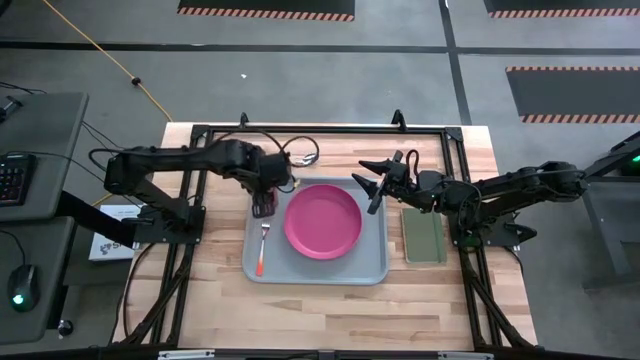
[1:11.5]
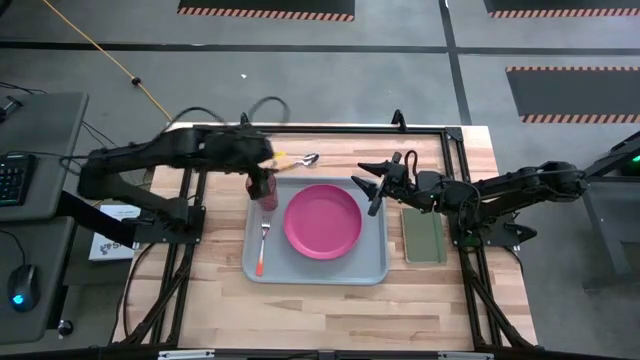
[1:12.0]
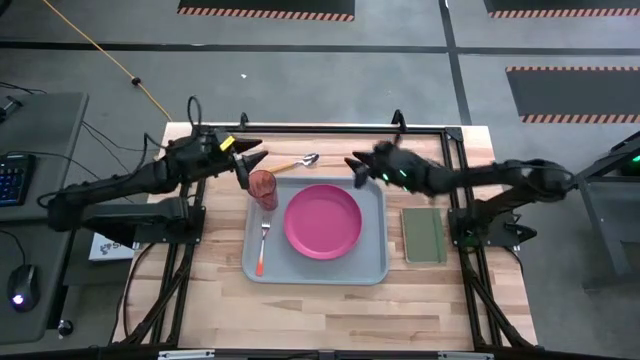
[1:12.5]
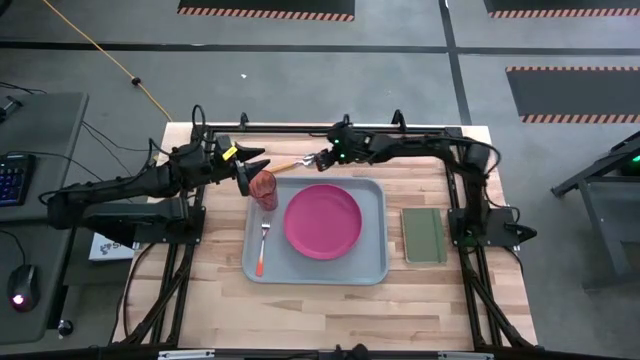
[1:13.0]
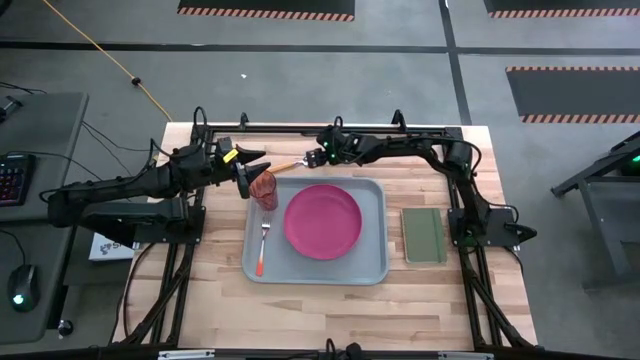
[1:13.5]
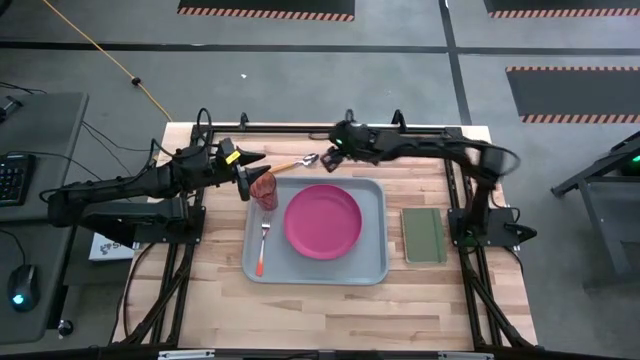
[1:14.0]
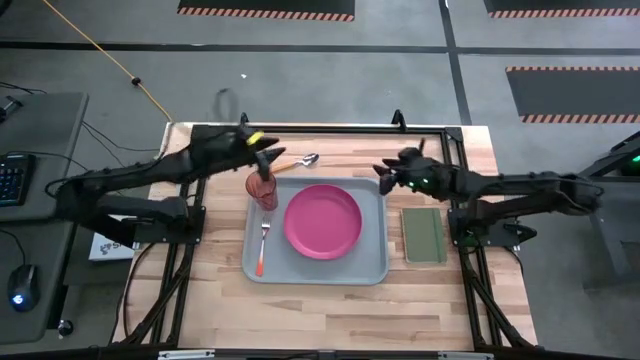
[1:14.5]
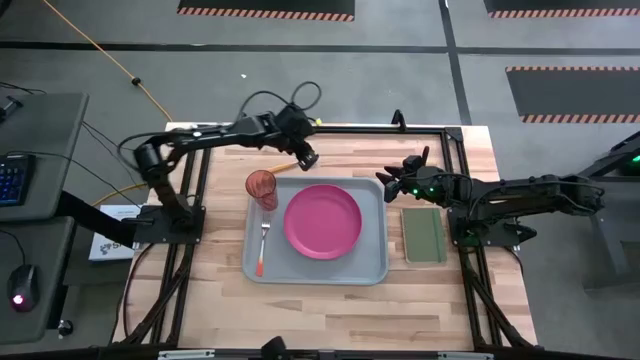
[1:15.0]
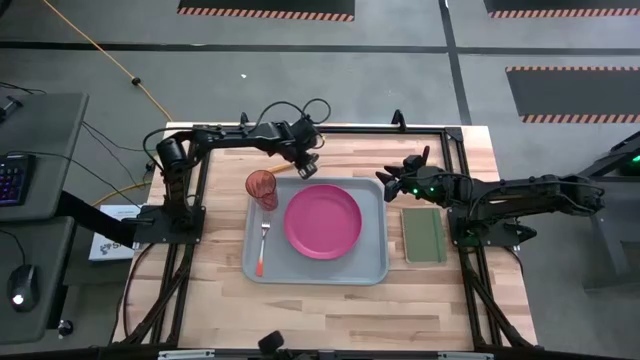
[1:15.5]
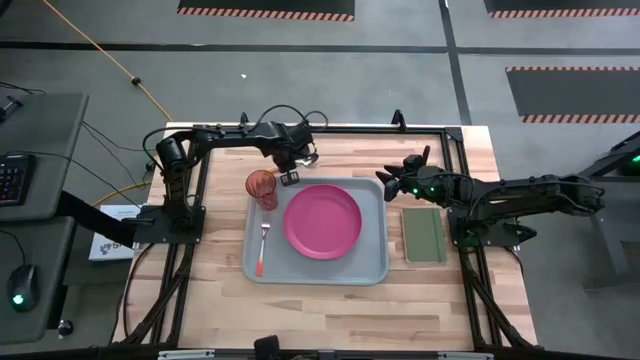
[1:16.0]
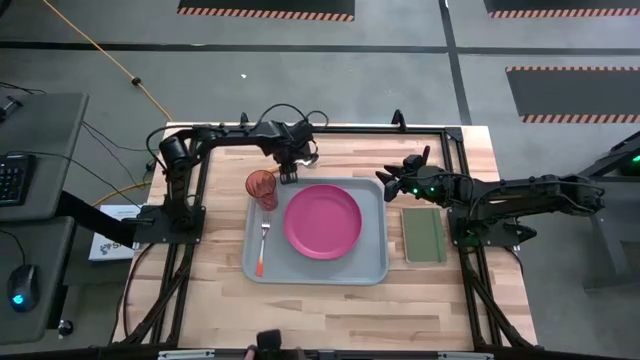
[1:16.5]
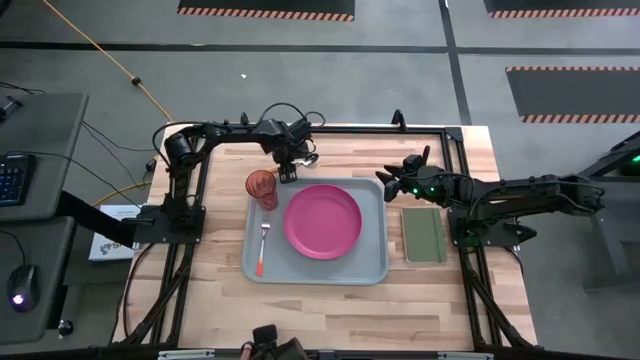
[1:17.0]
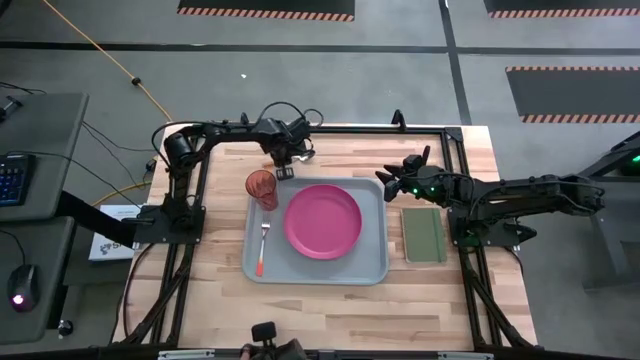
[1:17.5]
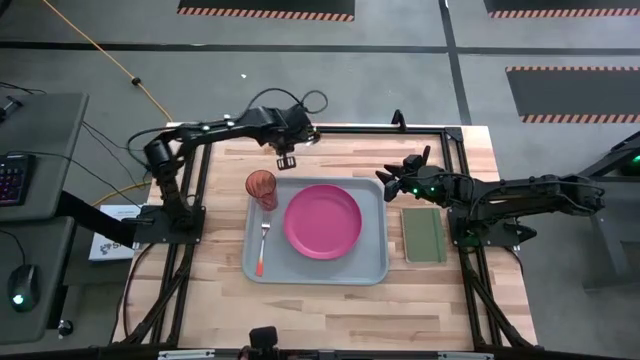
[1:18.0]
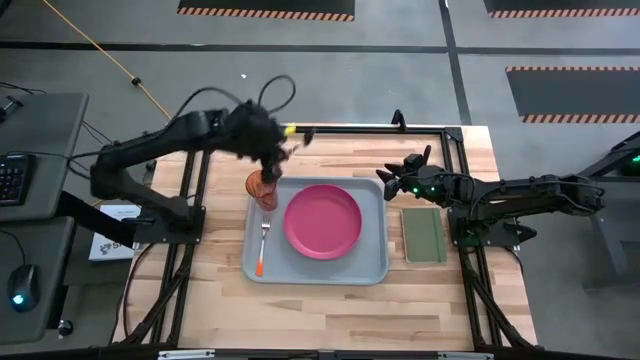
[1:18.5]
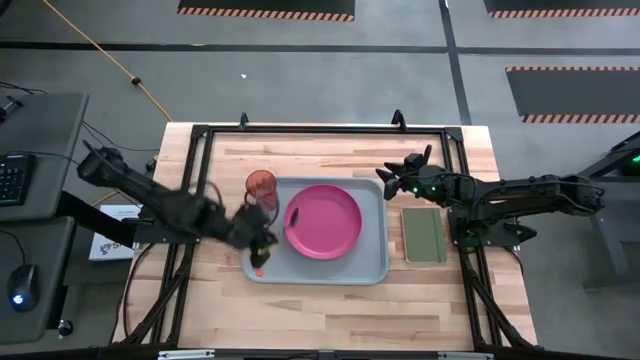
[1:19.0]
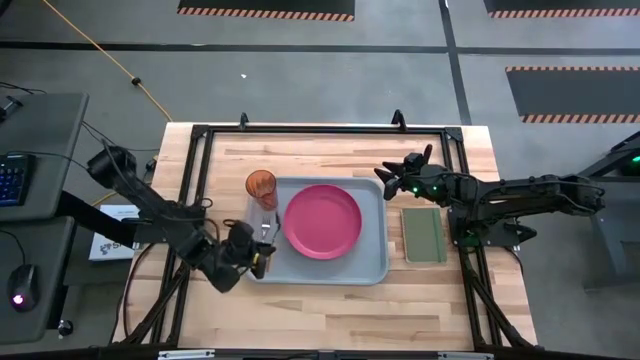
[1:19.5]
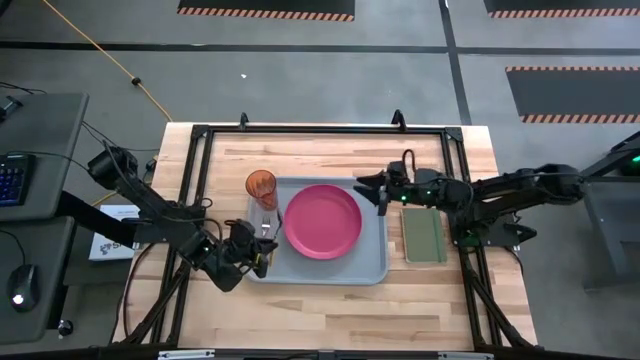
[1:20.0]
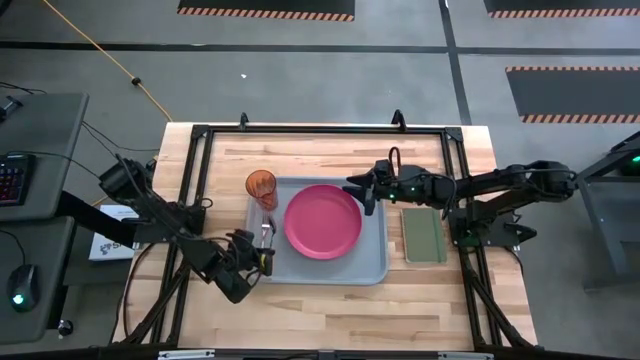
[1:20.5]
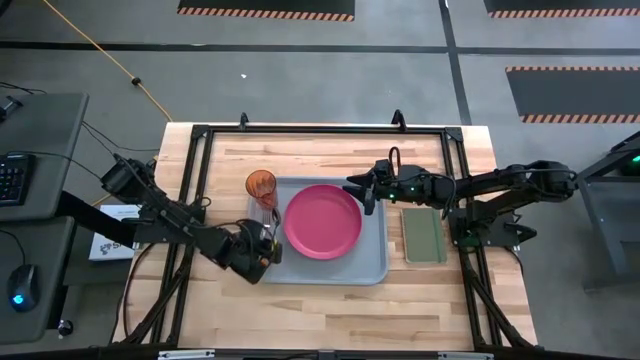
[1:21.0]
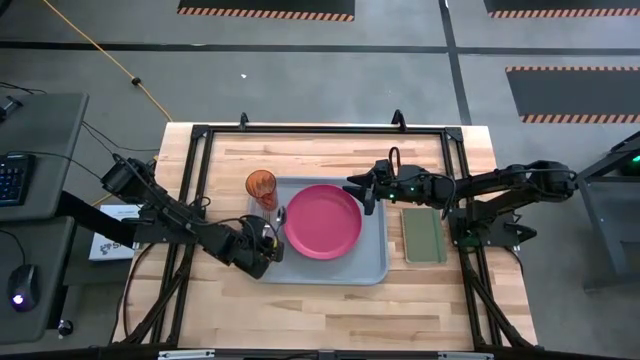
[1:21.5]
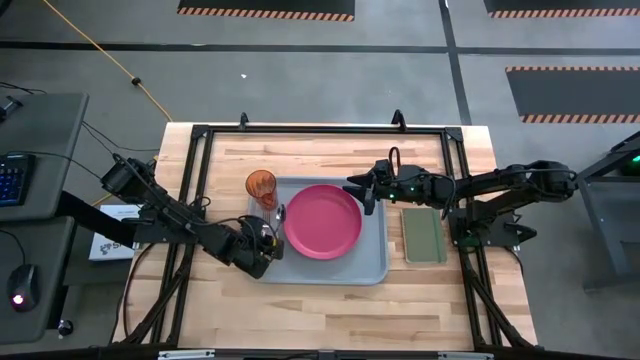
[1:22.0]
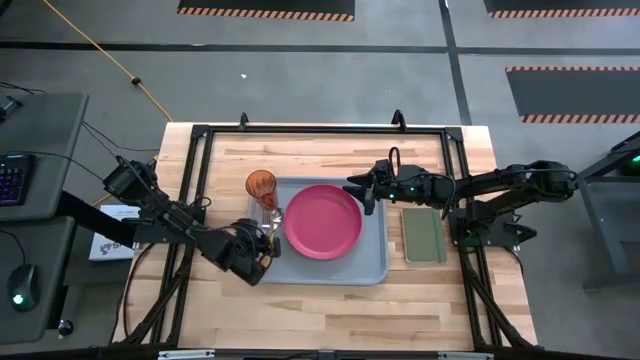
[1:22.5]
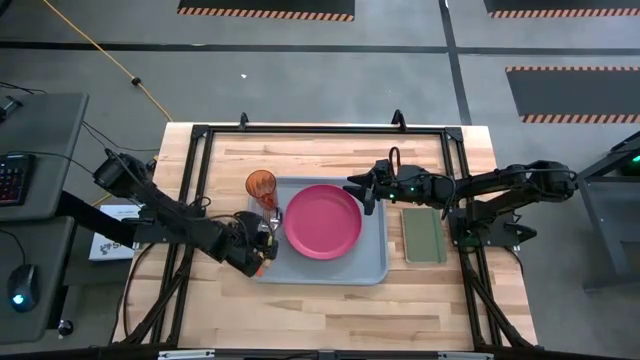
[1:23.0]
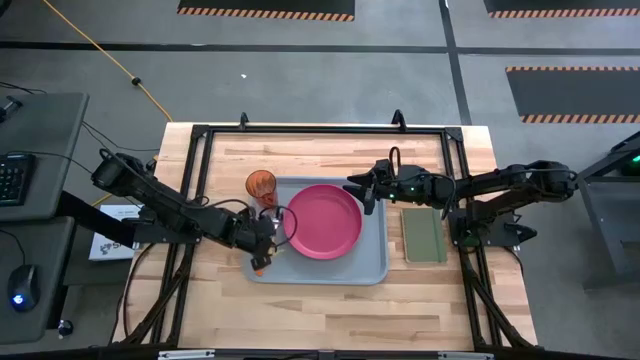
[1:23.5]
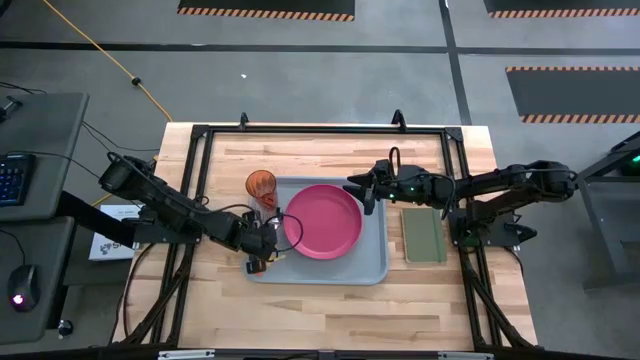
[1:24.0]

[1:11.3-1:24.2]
Task: Pick and place plate/cup/fork/spoon on tray
Put the yellow spoon on the gray serving tray to the left of the pink plate

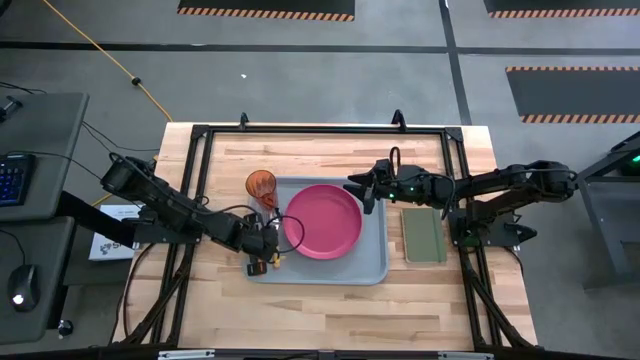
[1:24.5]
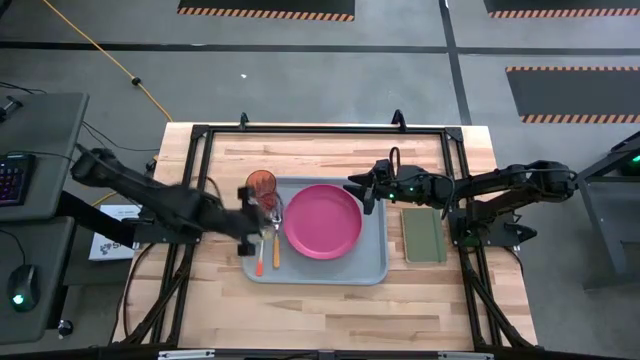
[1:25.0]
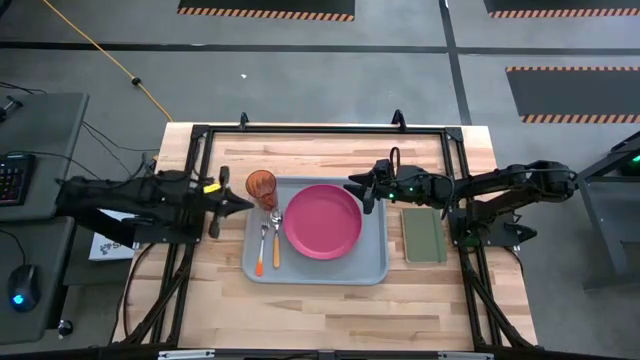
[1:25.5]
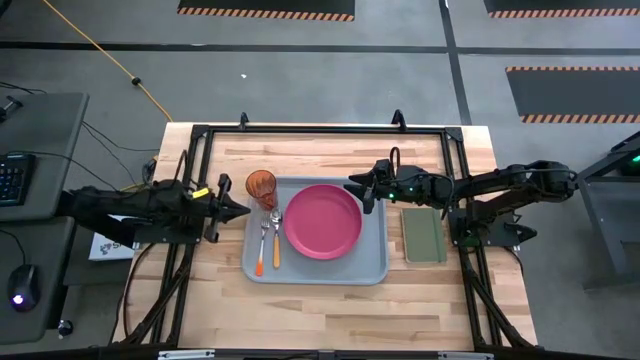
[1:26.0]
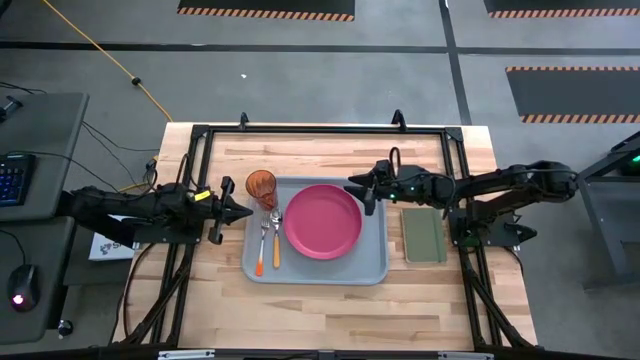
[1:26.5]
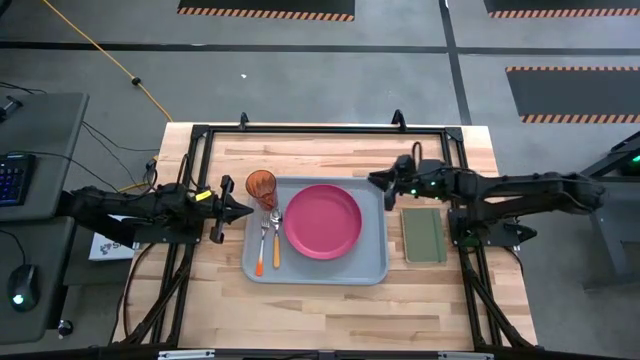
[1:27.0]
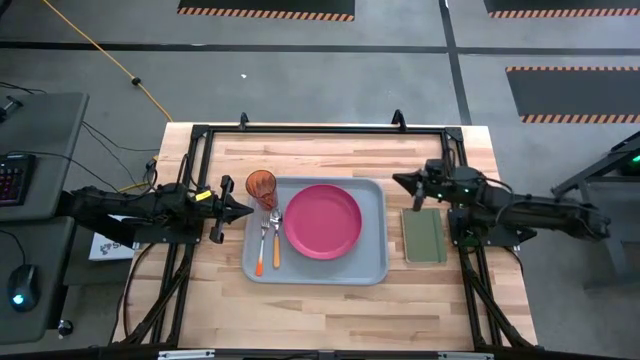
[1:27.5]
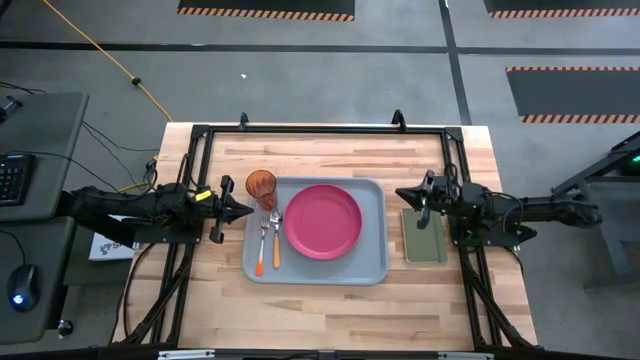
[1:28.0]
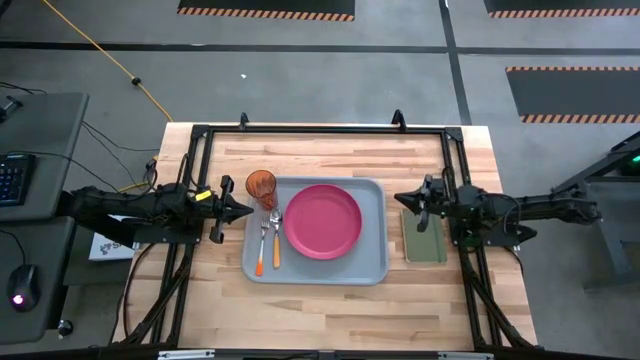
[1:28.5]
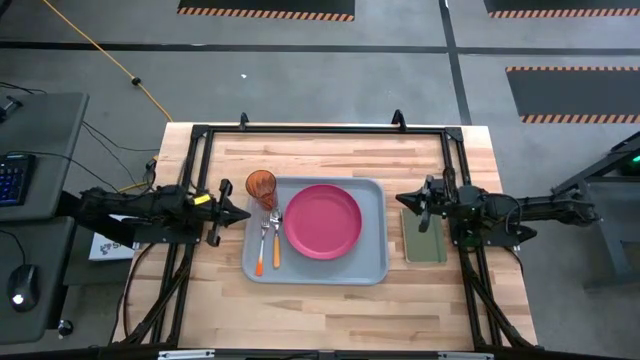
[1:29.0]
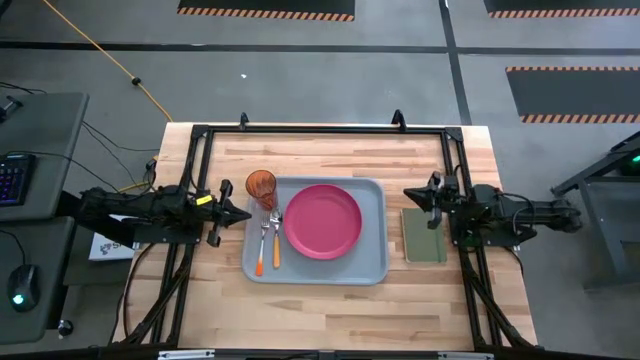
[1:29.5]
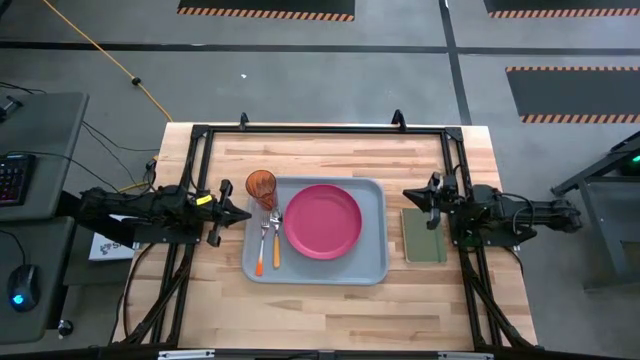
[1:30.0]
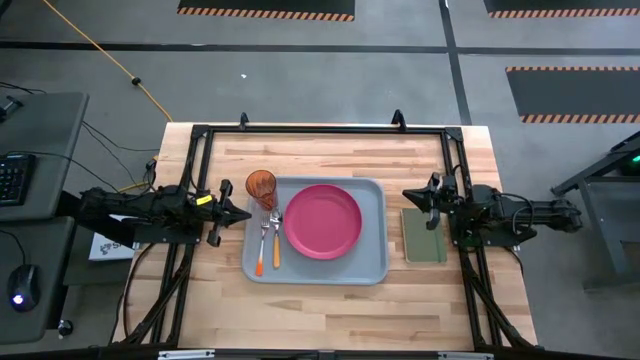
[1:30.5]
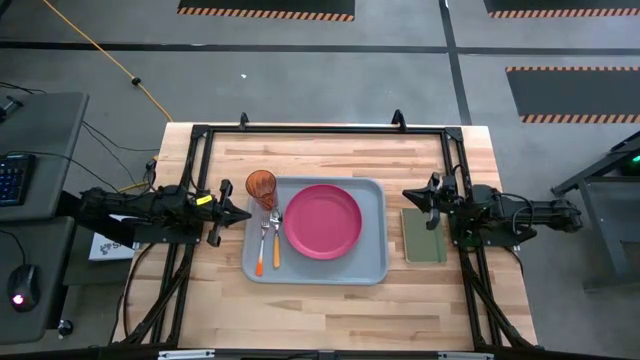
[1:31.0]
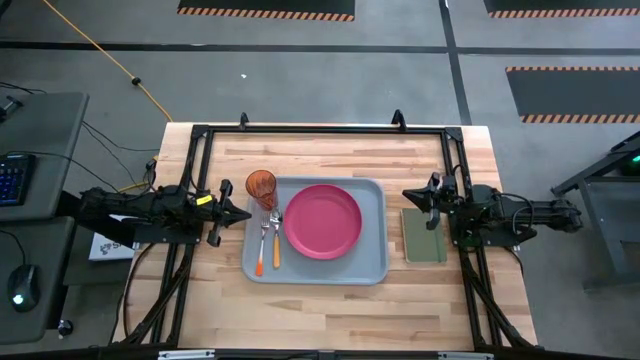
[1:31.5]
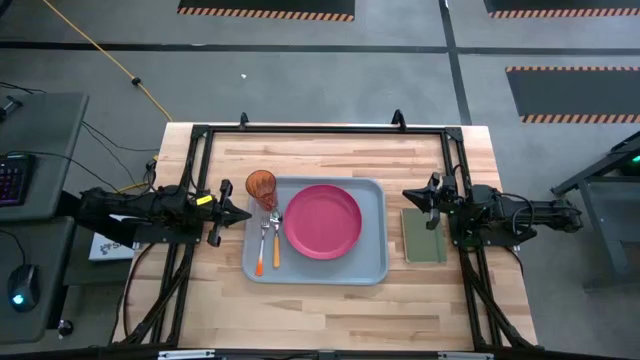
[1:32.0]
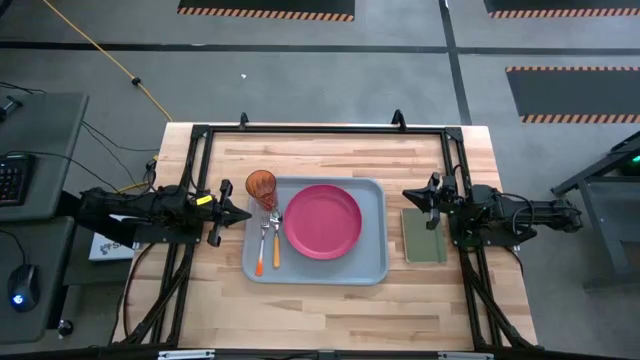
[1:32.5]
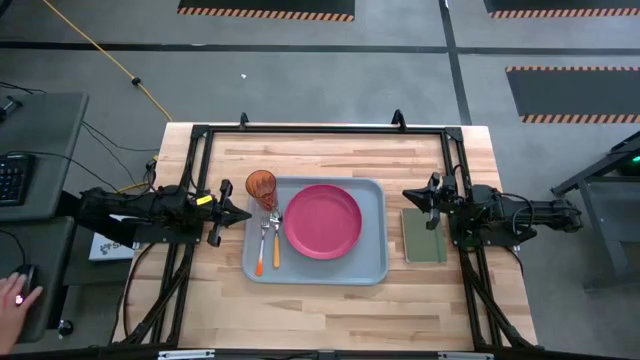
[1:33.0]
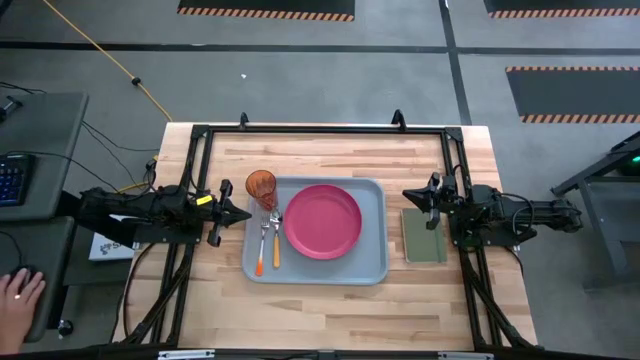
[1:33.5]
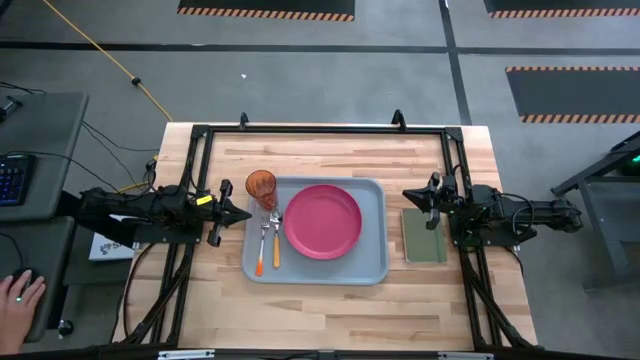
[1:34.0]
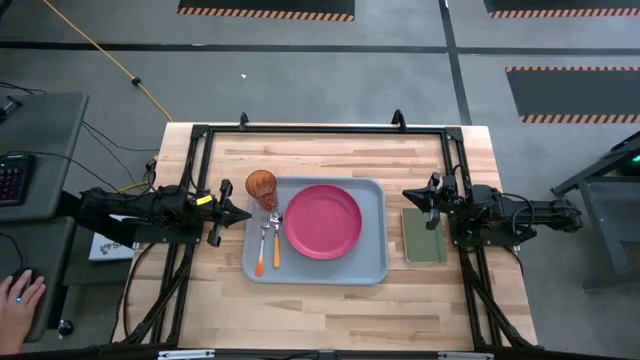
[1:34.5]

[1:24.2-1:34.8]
Return to Home Position
